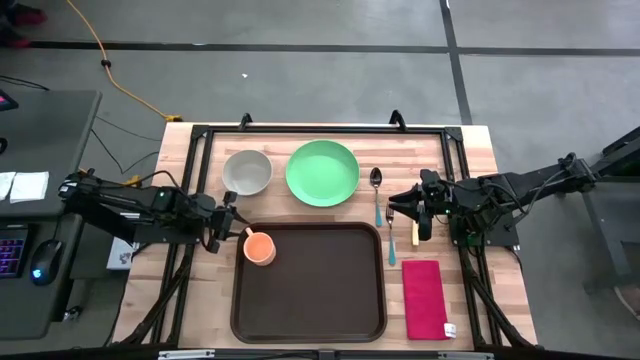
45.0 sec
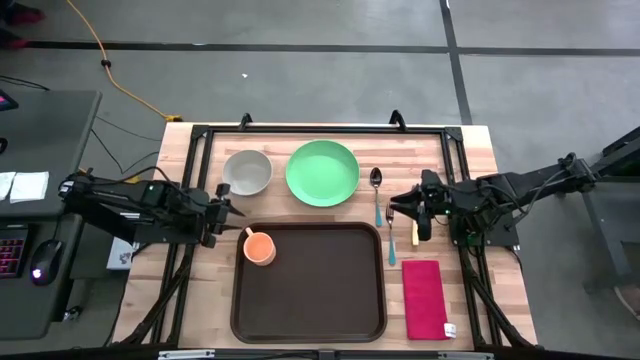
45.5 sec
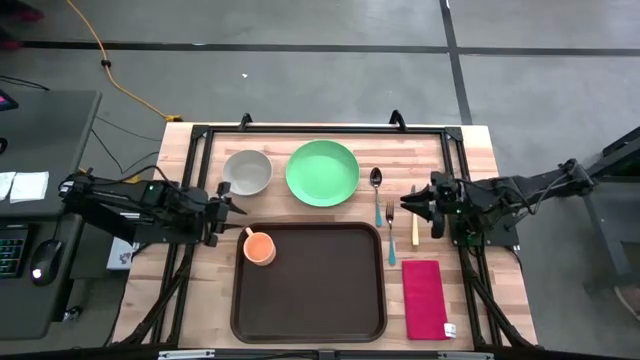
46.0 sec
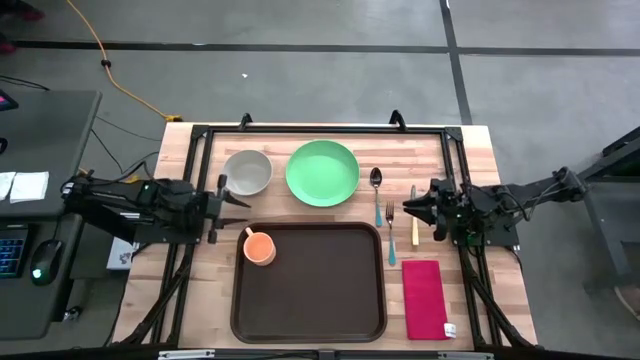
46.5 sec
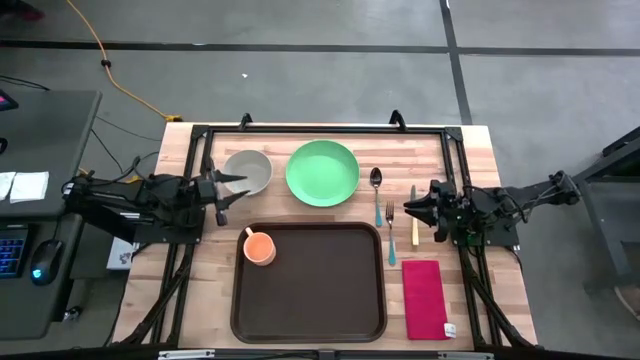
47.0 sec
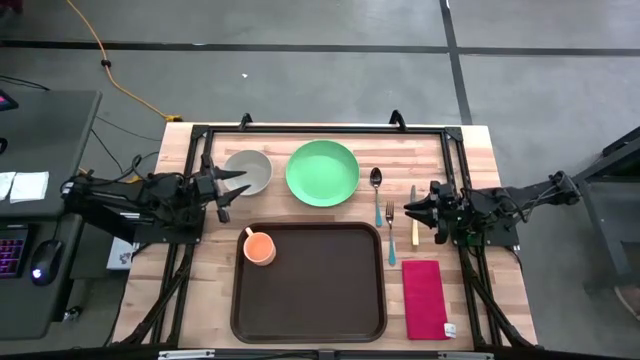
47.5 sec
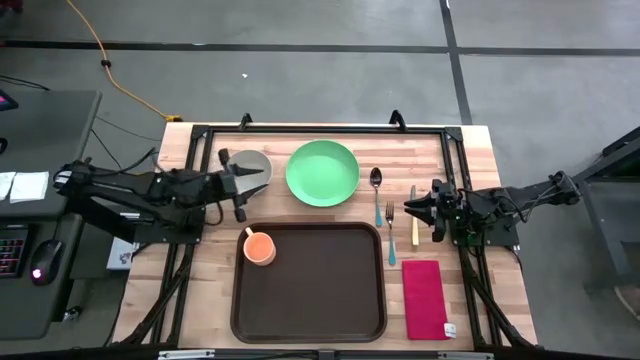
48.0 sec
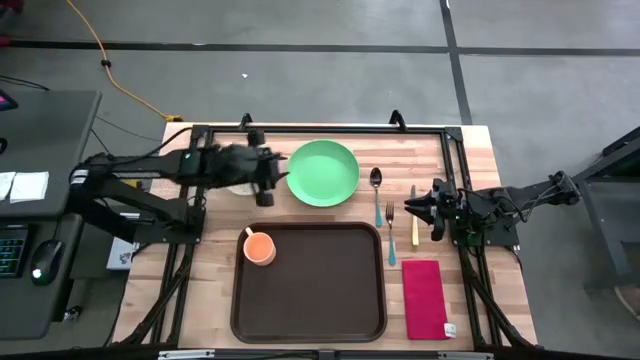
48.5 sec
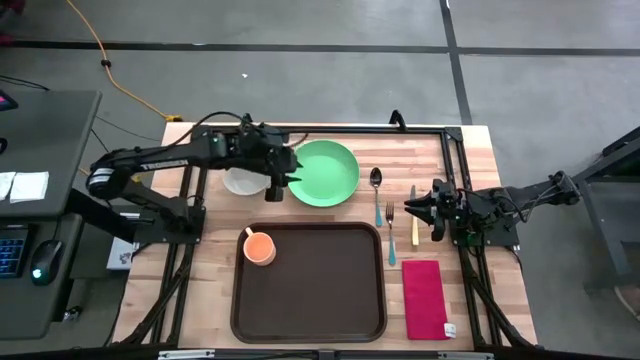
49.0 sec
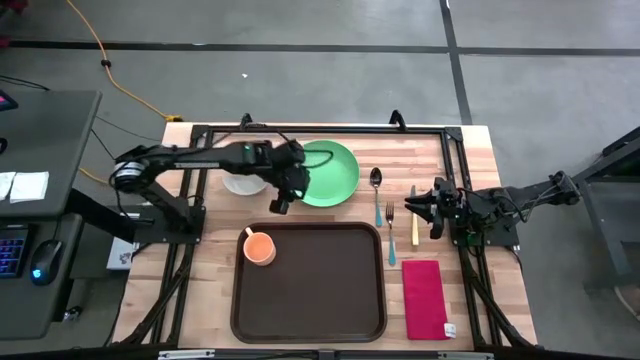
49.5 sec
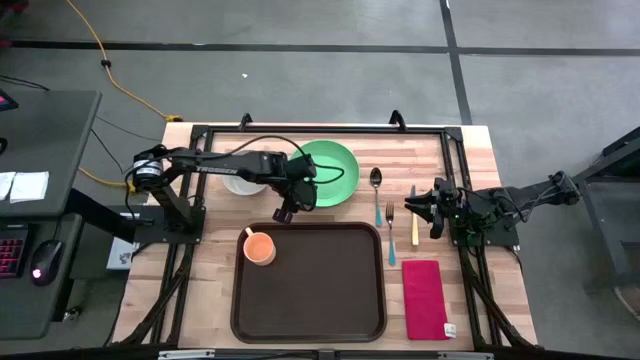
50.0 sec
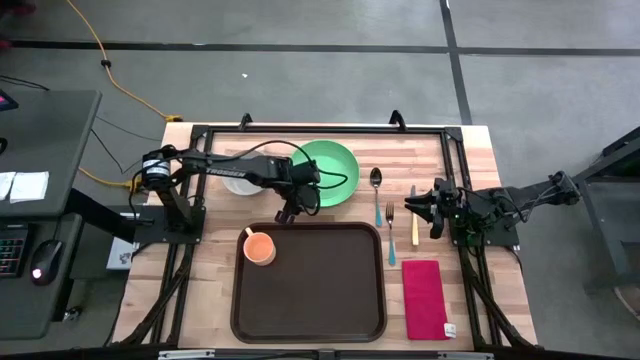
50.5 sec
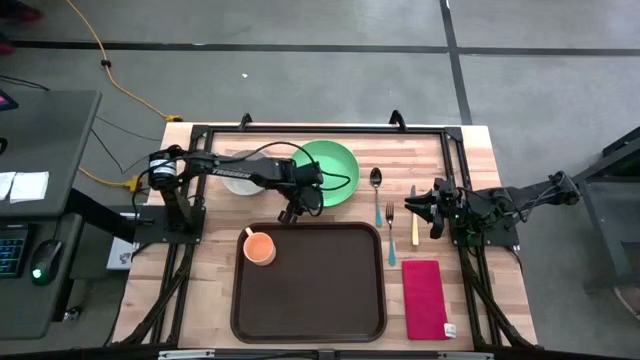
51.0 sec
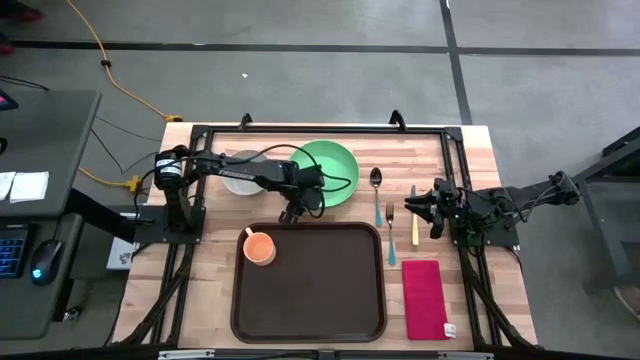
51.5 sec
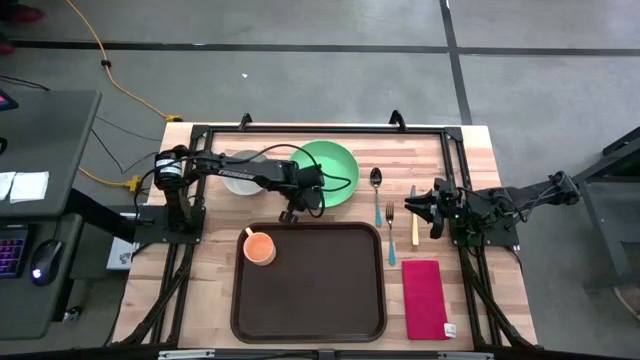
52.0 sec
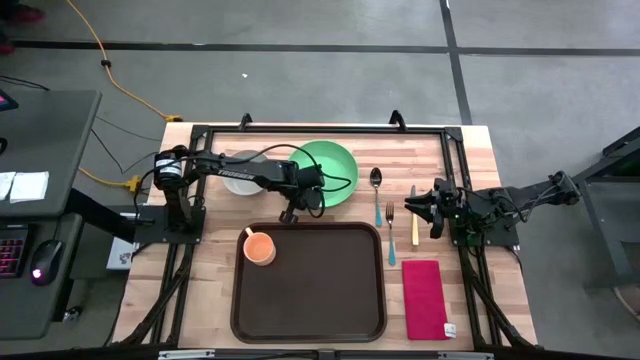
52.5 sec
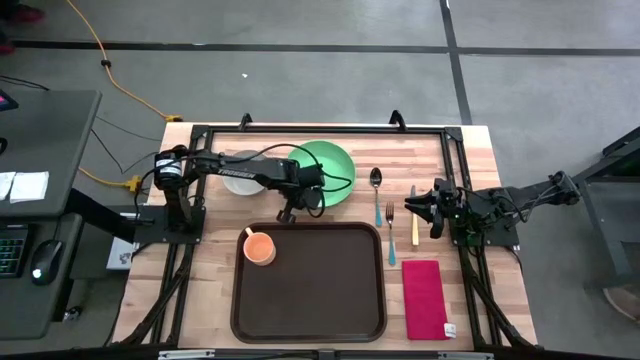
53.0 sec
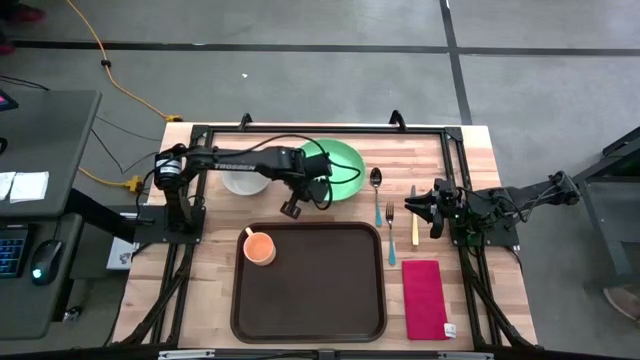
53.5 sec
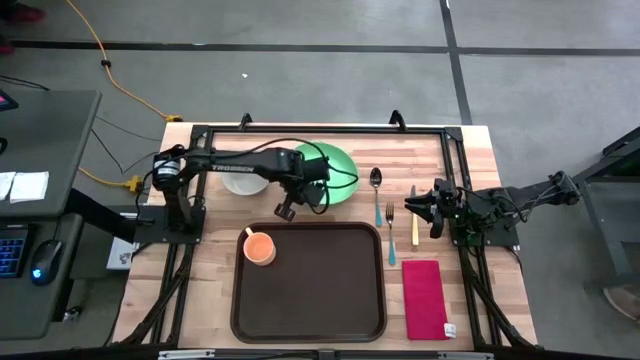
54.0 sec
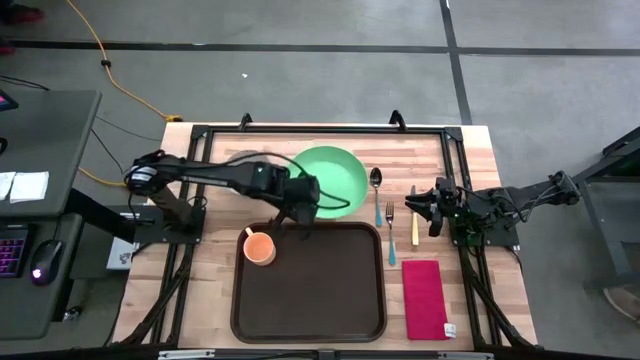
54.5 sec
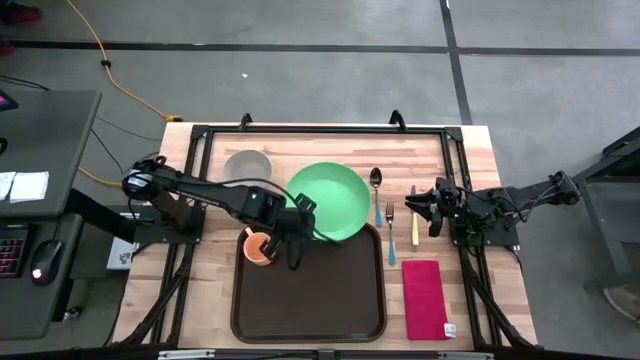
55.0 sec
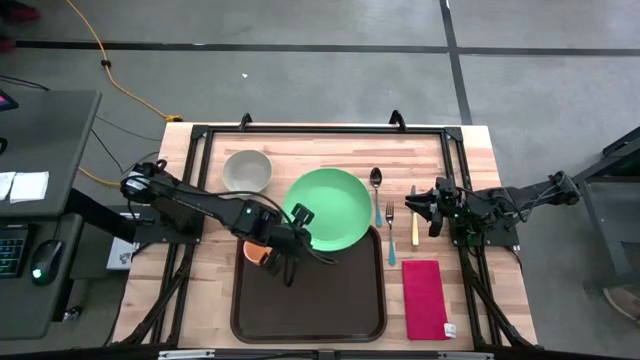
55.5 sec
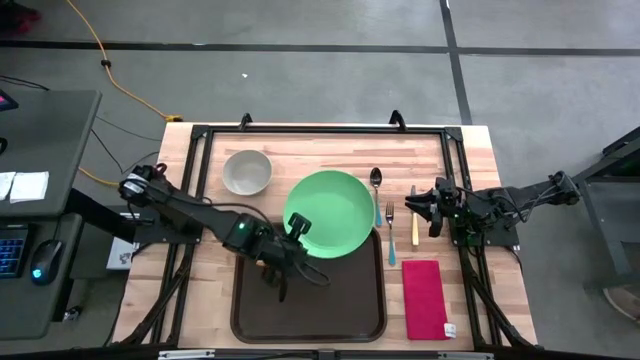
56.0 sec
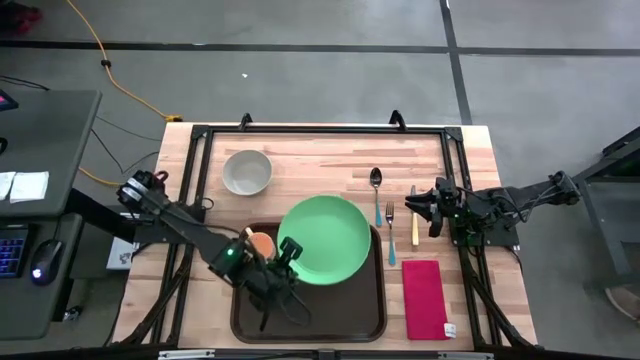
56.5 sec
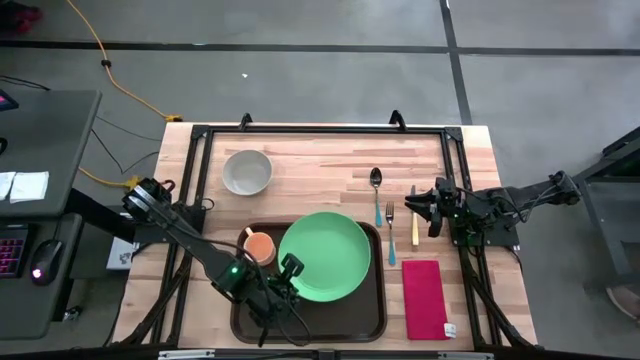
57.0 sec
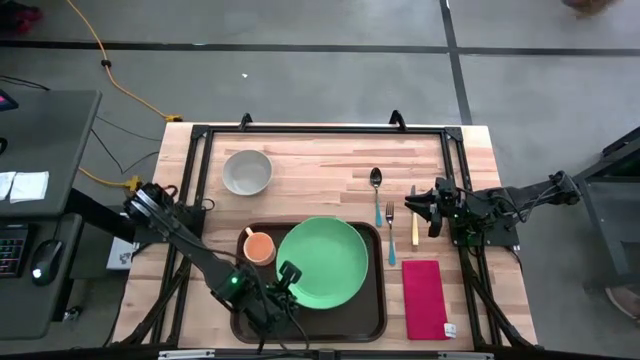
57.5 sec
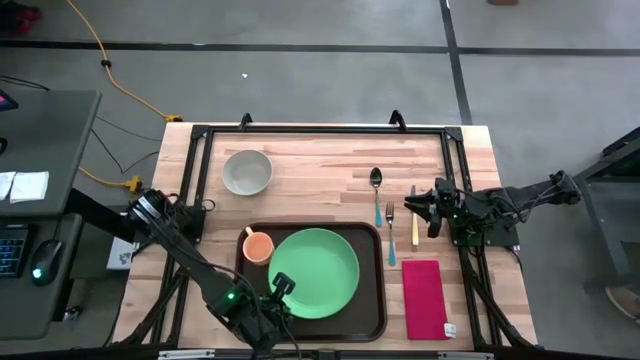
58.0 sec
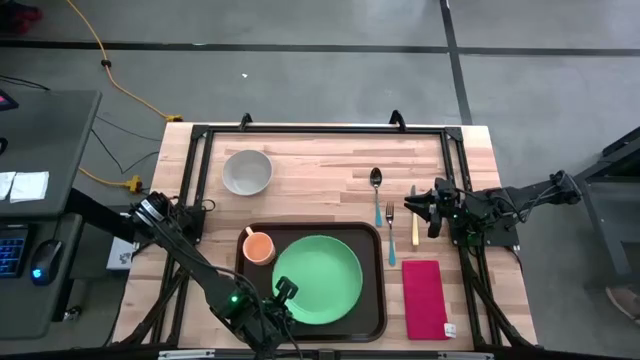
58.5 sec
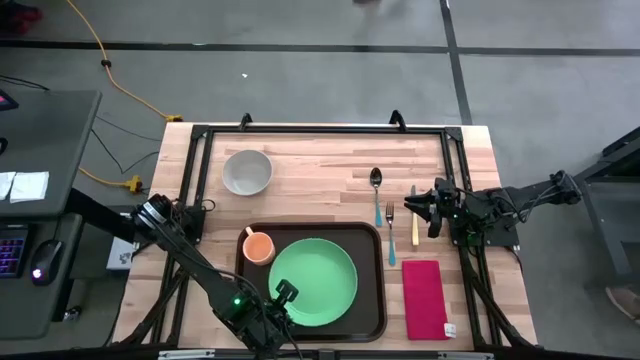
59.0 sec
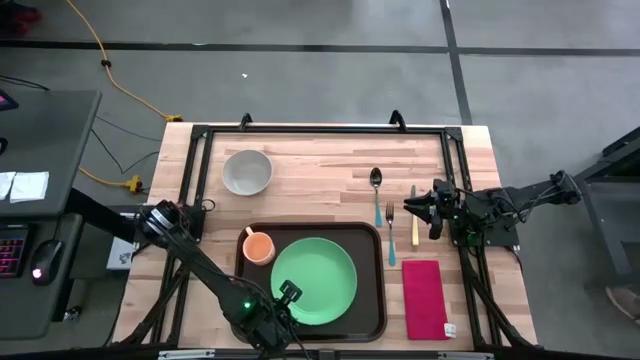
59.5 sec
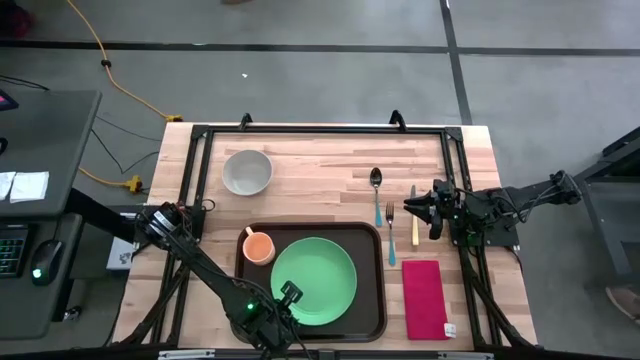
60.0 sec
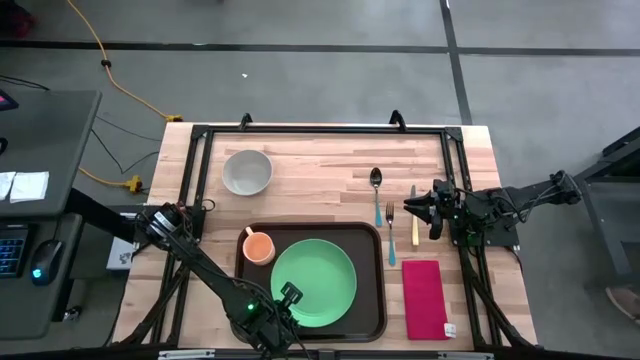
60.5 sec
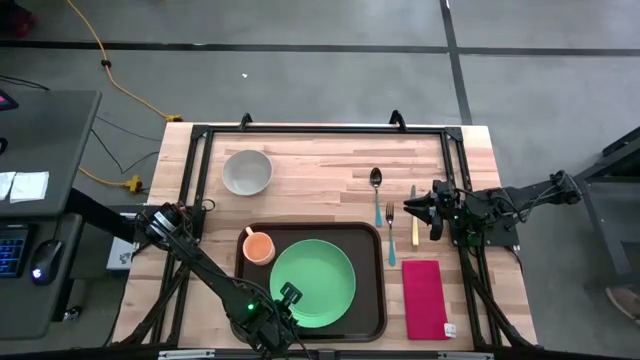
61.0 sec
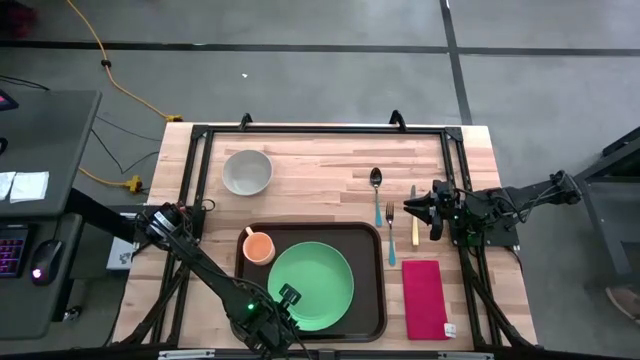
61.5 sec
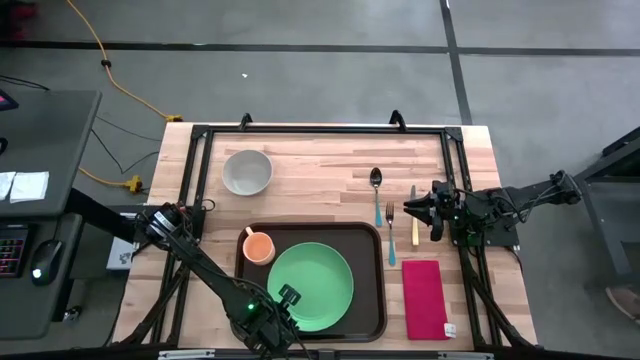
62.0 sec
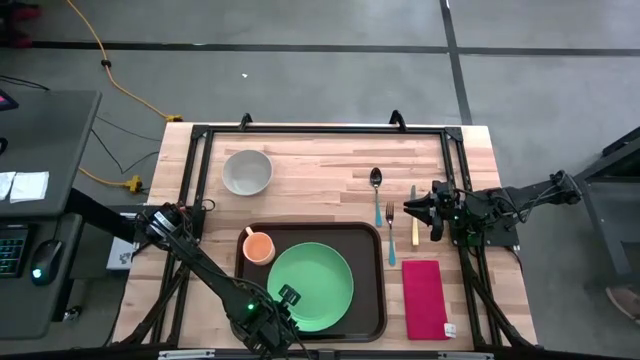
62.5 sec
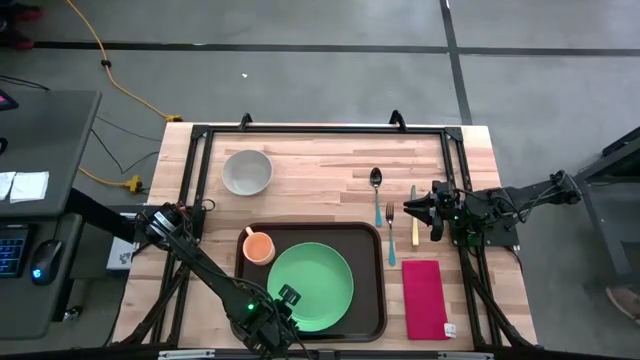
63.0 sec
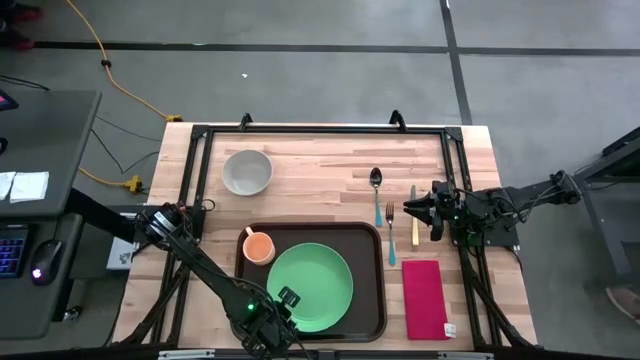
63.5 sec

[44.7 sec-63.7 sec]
Task: Set up tray
Put the green plate to the right of the orange cup on the brown serving tray

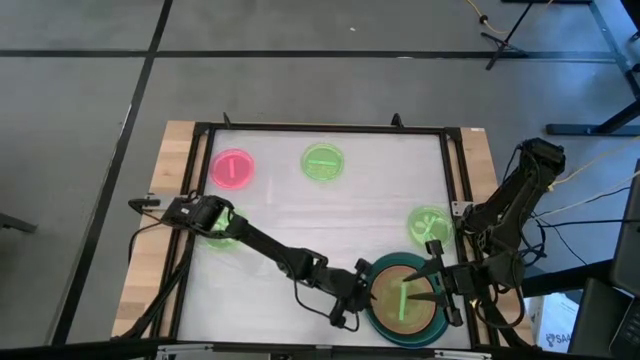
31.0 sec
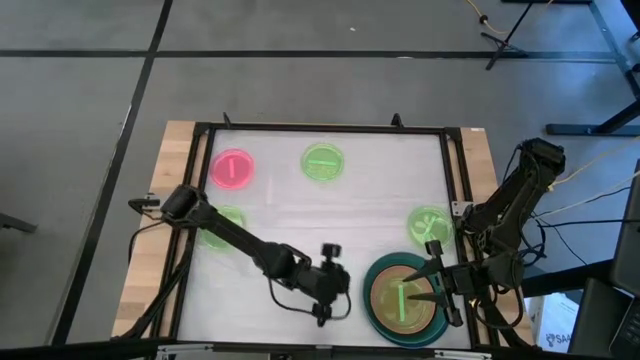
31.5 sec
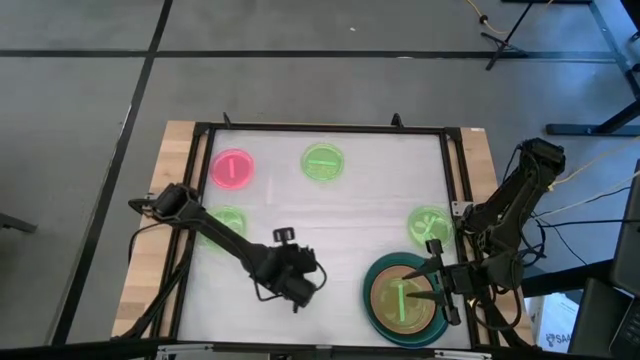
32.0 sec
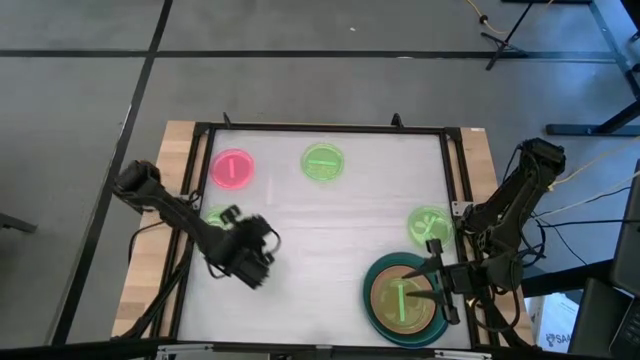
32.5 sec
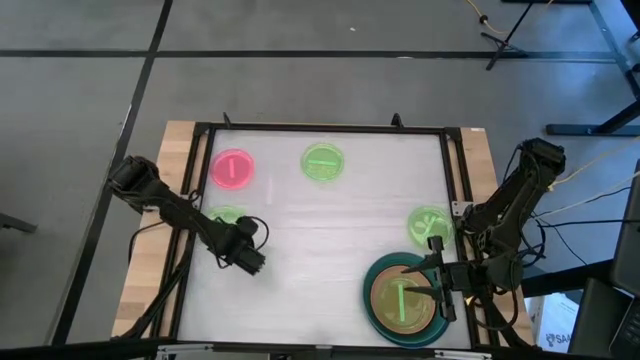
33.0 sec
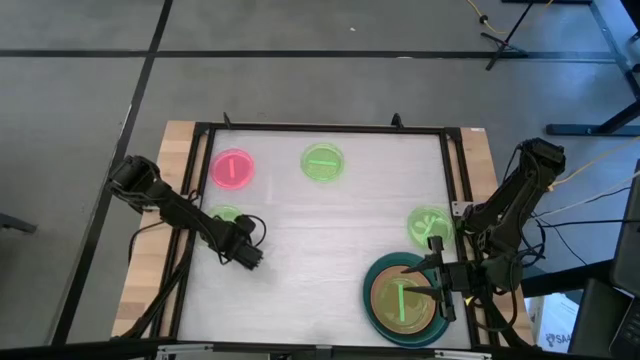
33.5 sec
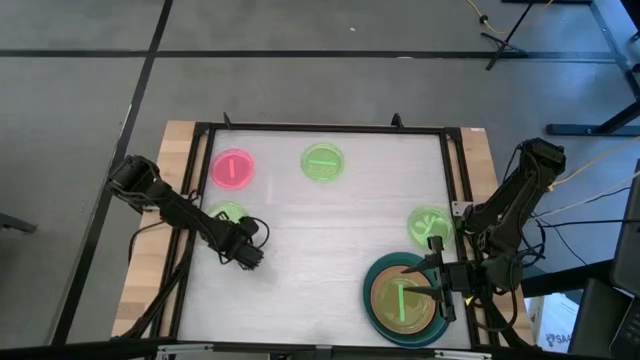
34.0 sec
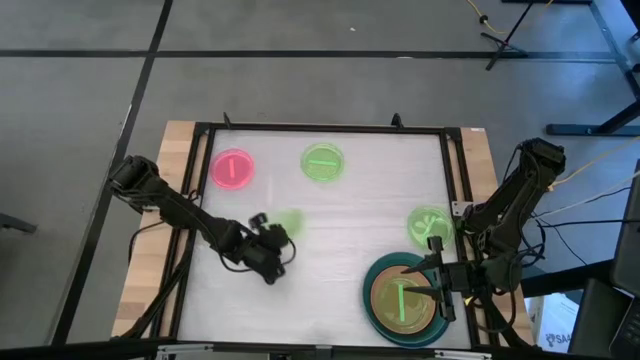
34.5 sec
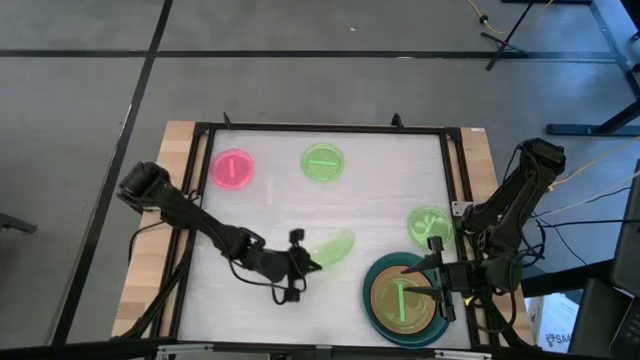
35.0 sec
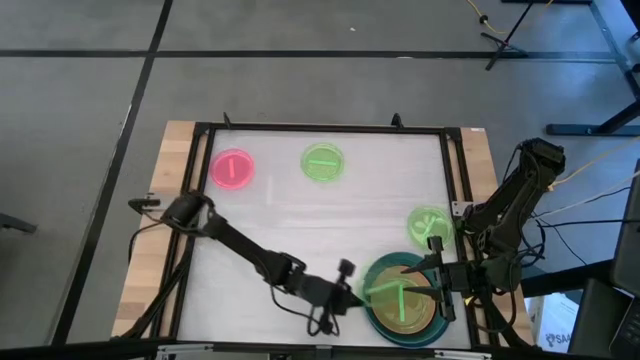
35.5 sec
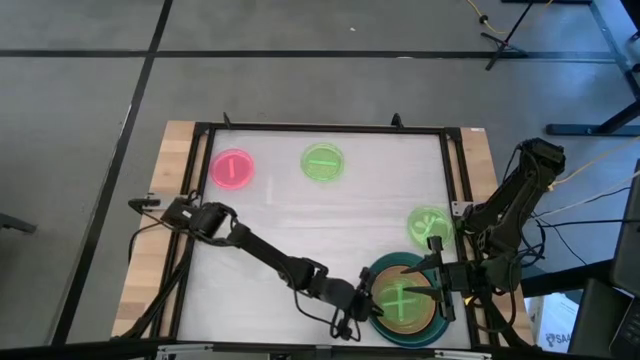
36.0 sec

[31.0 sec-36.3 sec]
Task: Stack plastic plates
Stack the green plate on top of the green plate
